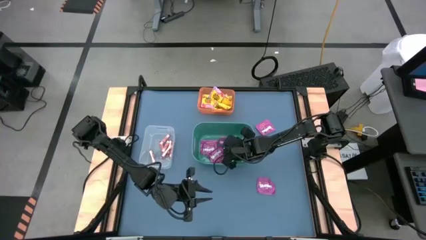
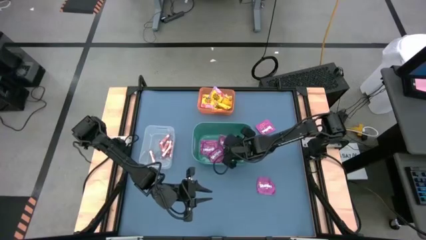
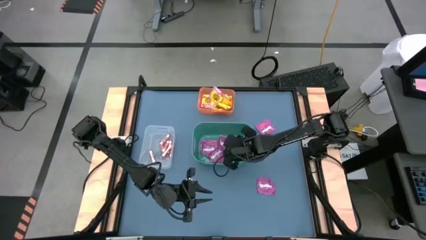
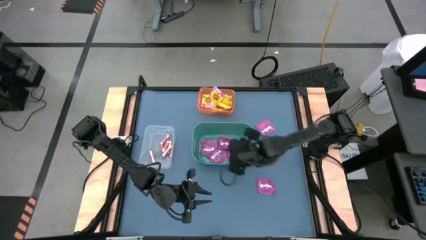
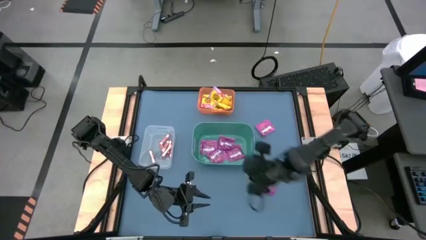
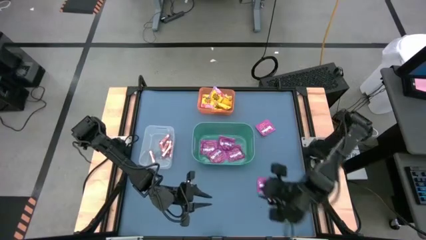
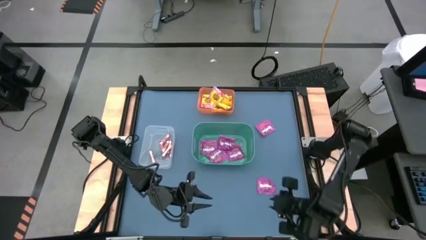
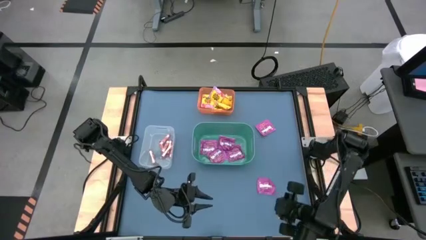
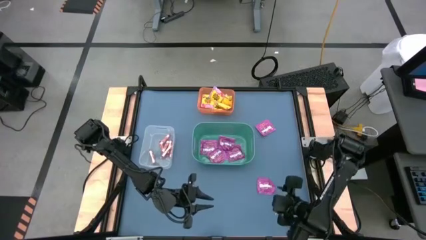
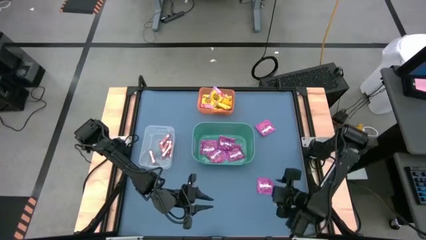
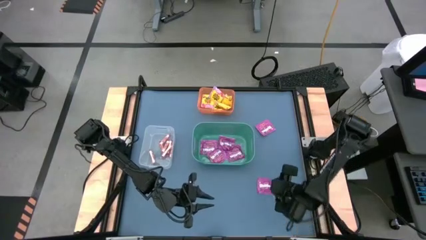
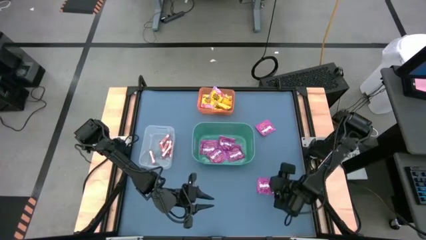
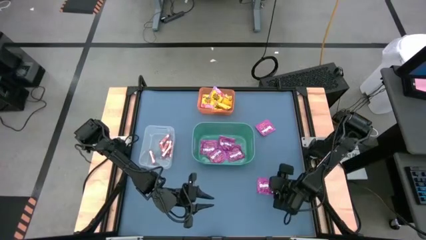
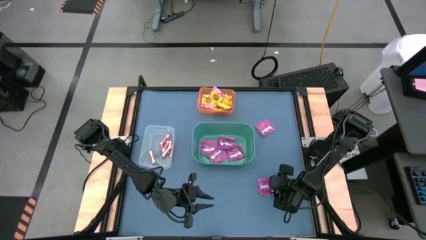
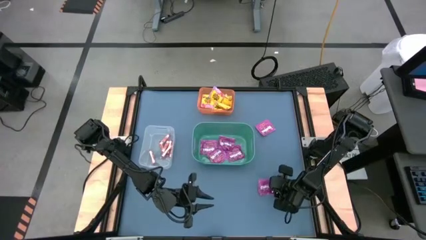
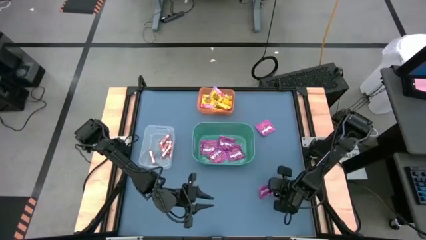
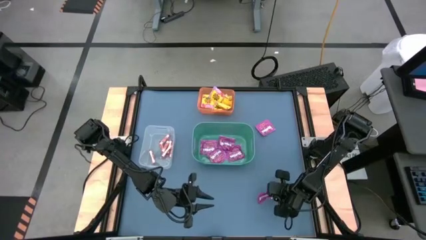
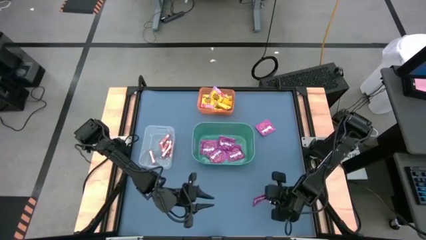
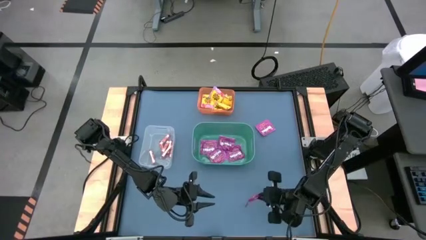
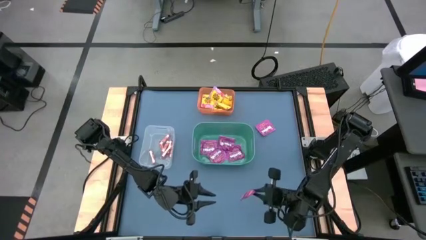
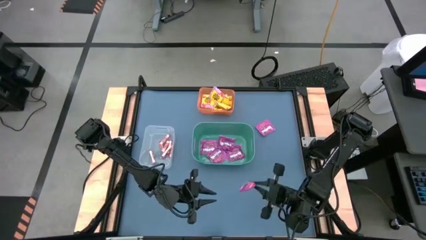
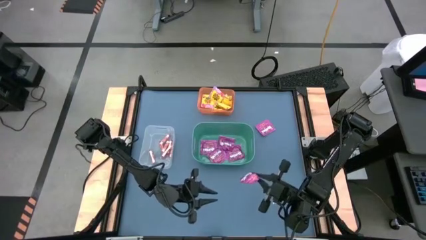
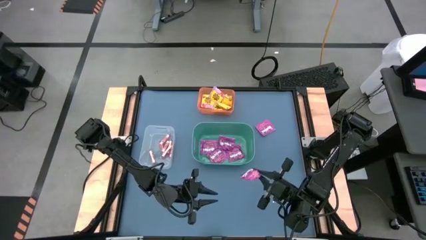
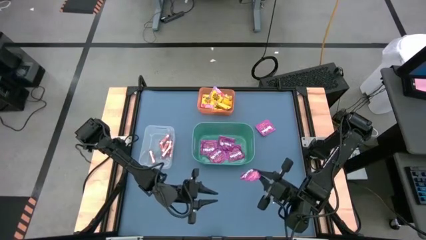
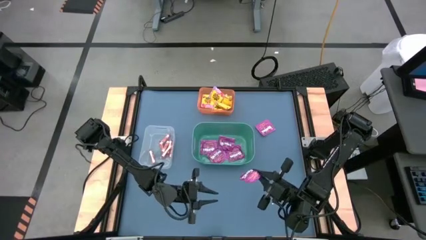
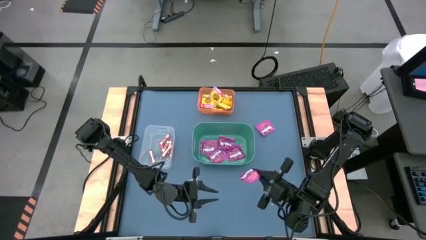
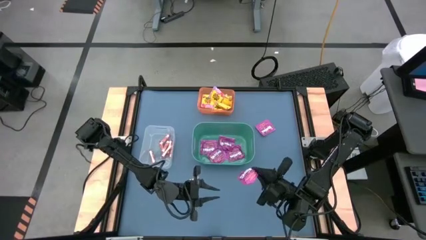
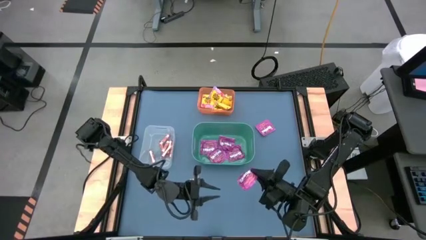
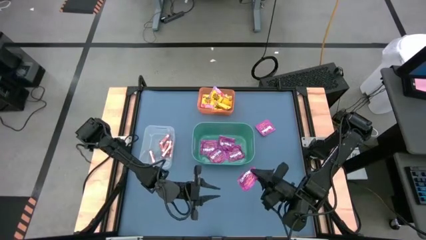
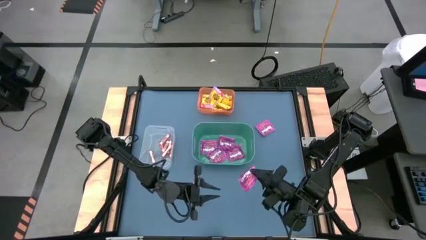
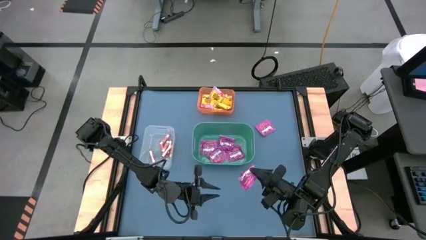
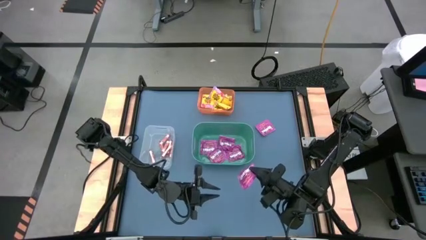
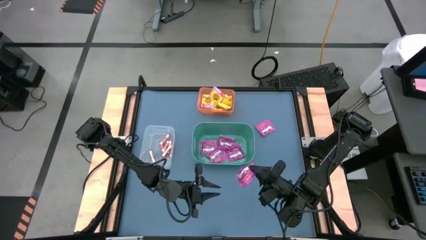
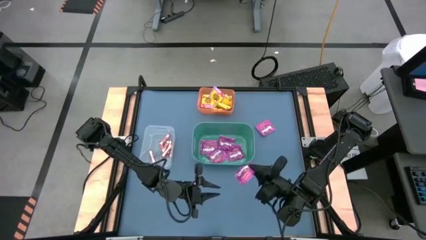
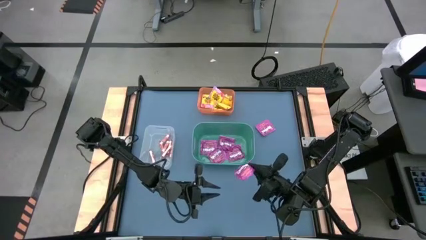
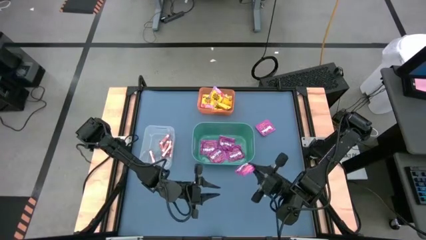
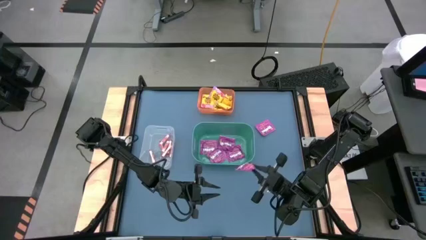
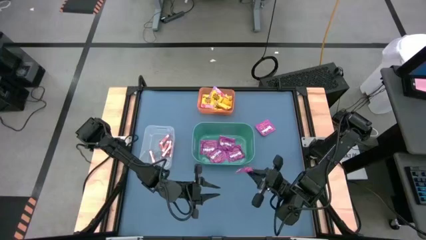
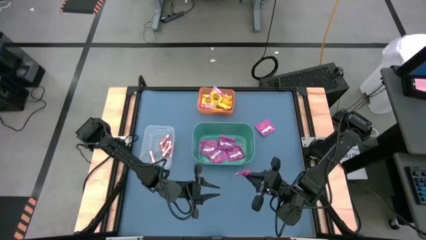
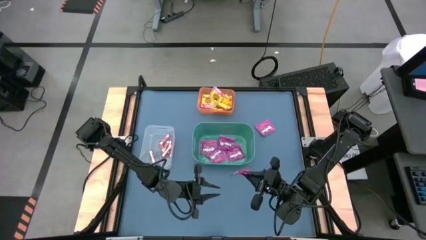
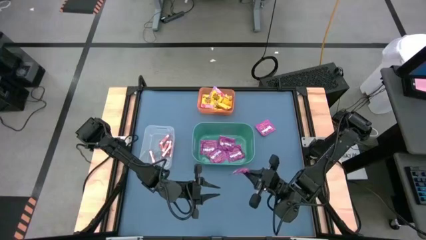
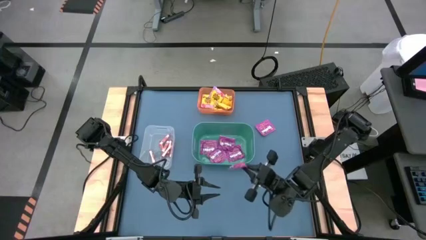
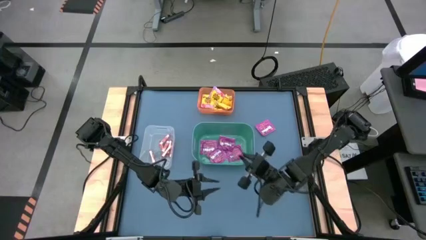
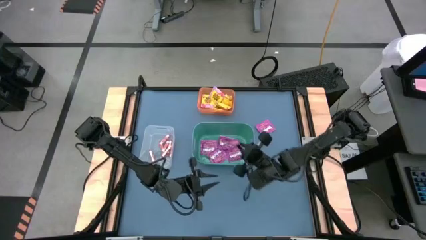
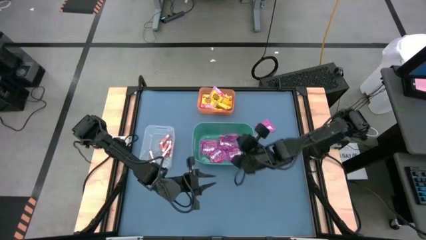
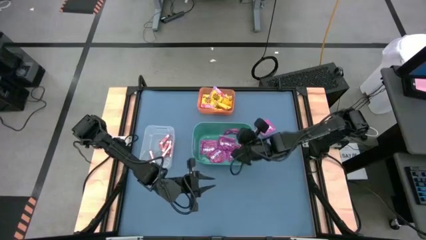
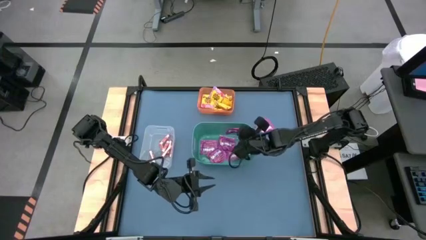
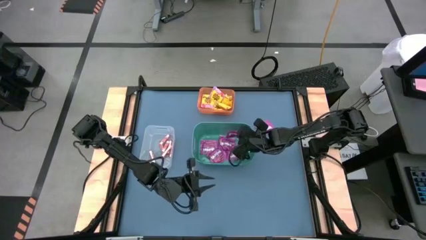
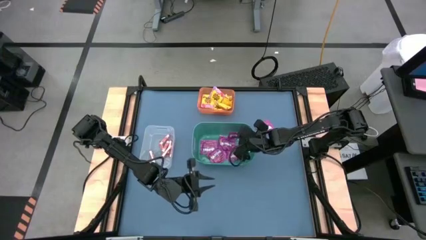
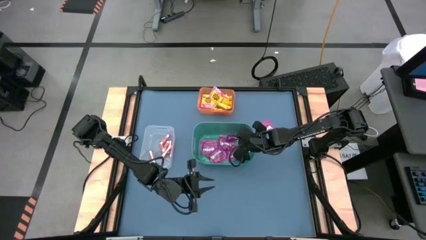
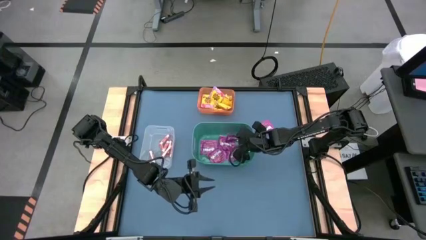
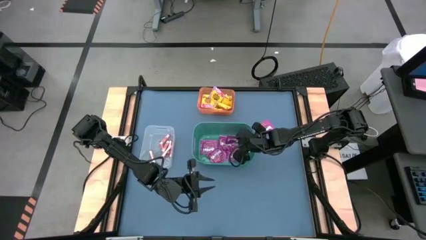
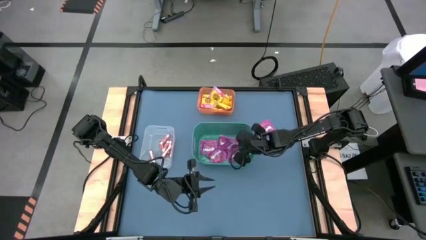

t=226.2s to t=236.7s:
Task: Sort candy
Put the purple candy into the green bin

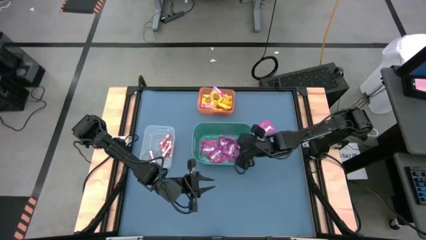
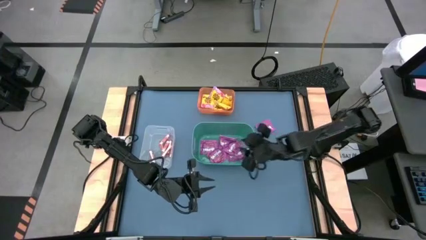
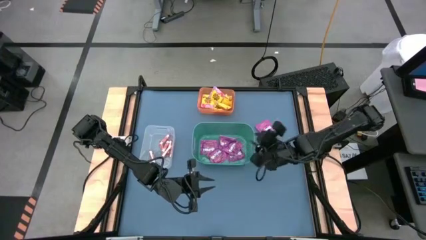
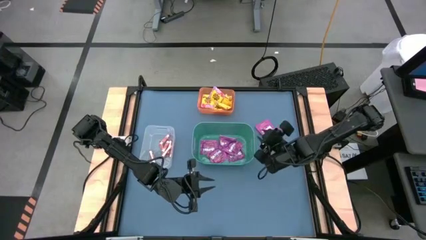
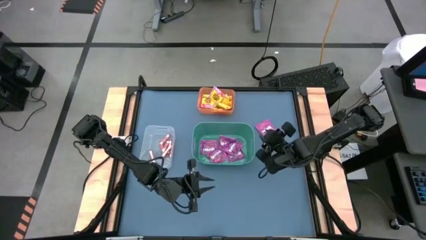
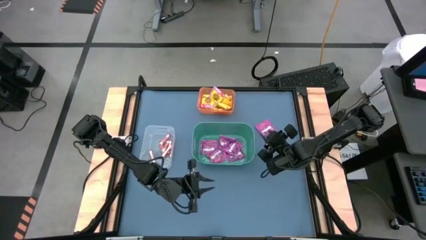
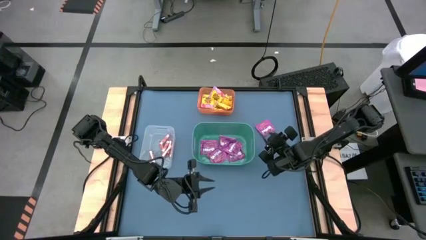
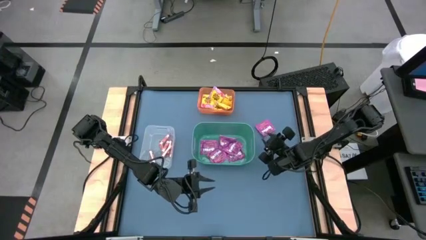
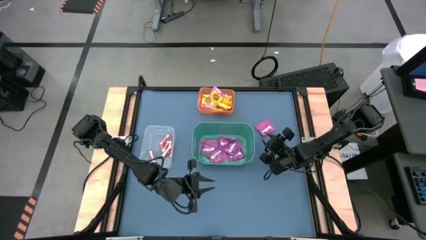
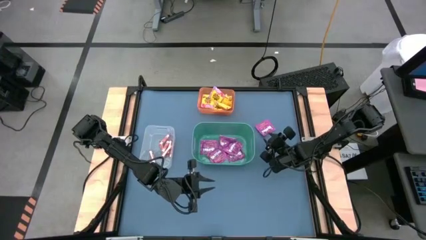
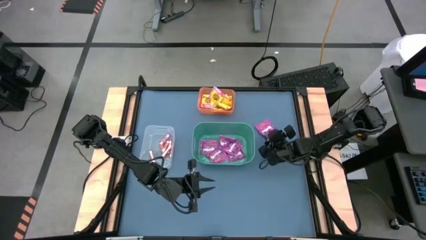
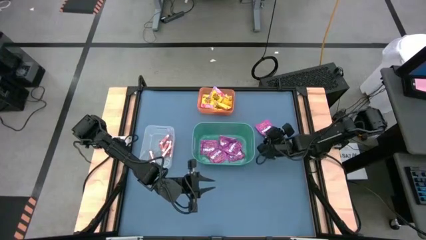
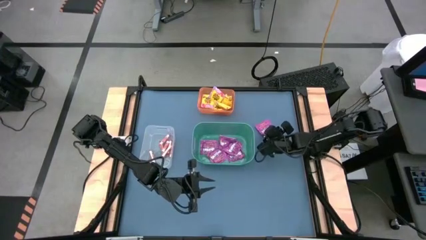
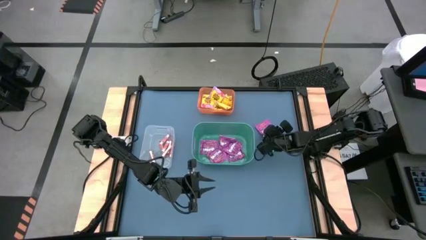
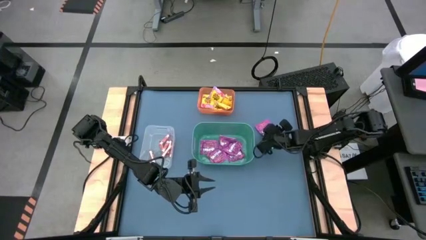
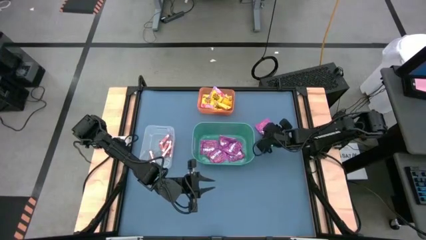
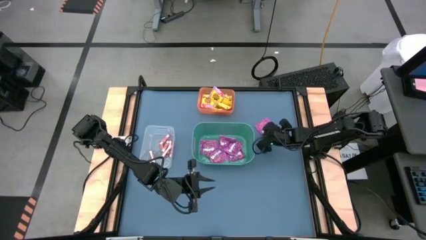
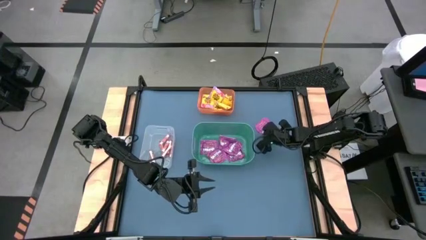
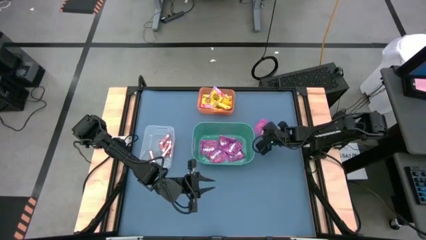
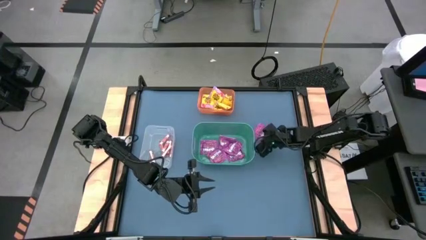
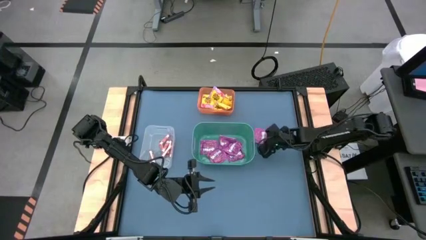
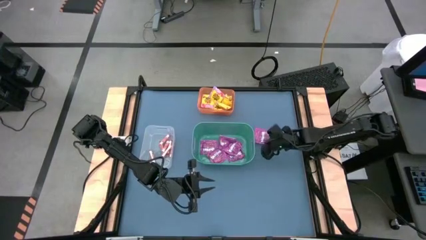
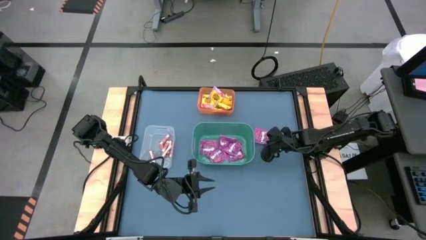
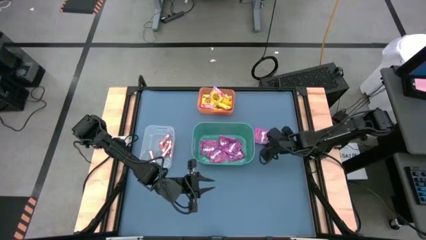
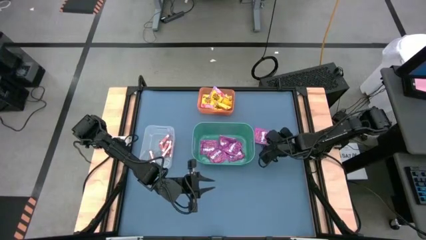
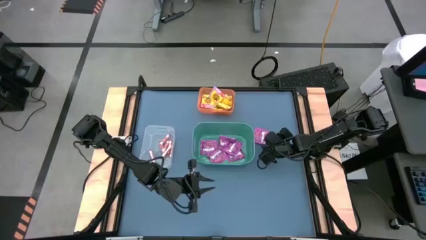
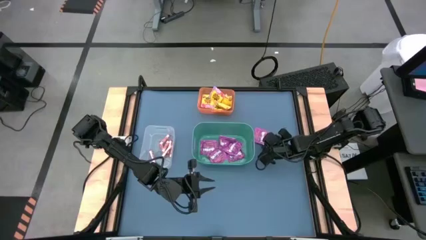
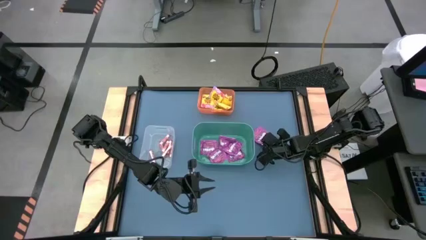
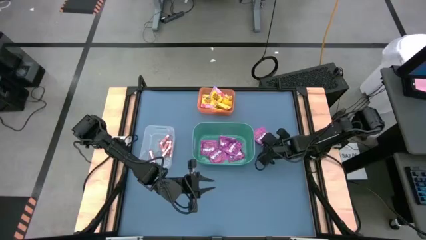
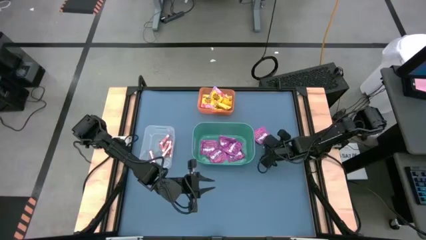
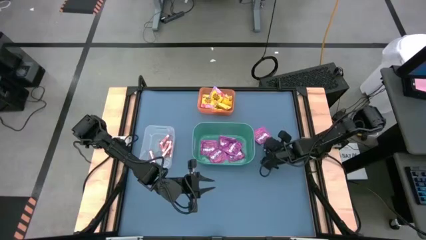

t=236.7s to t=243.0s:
Put the purple candy into the green bin

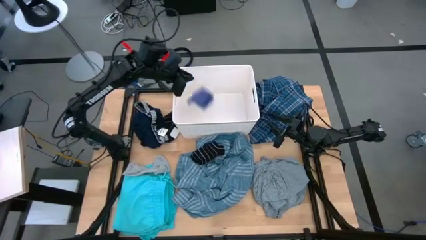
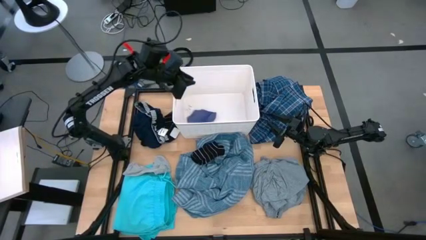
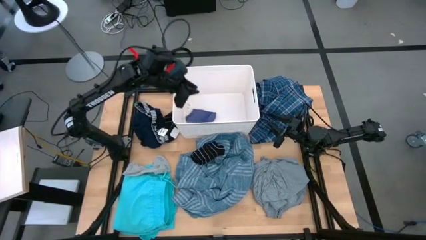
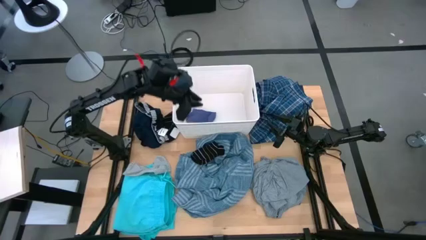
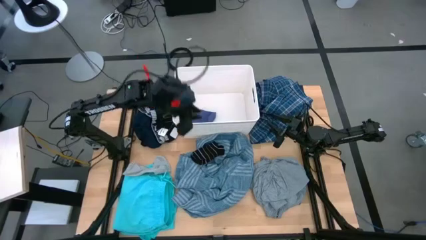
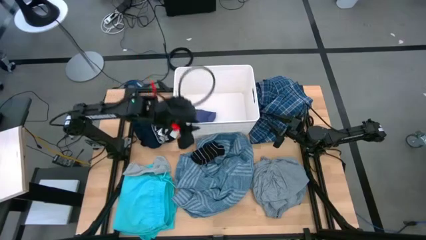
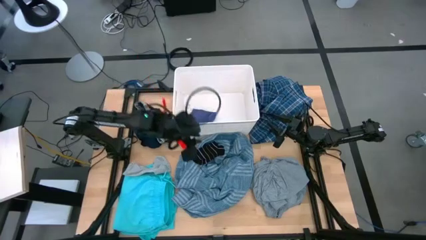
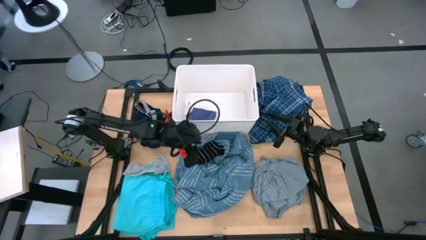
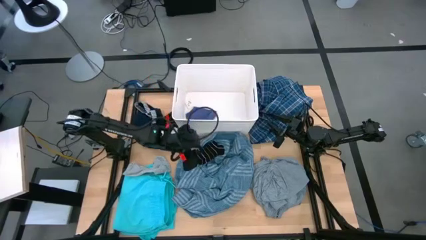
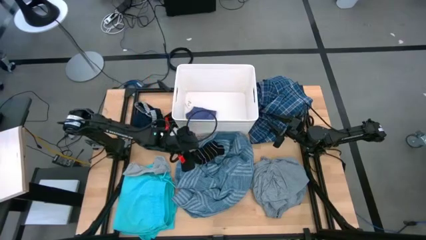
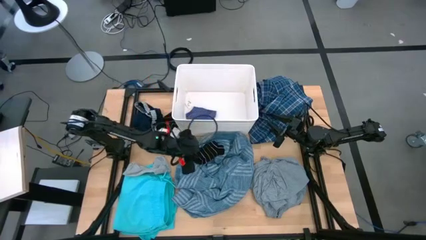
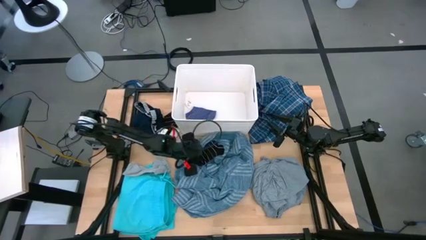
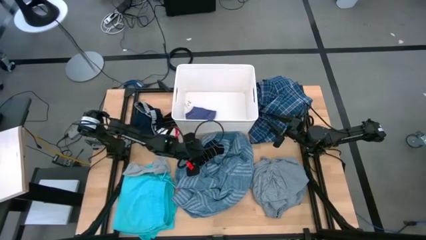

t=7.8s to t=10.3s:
Task: Sort clothes
Put the black sock into the white laundry bin
